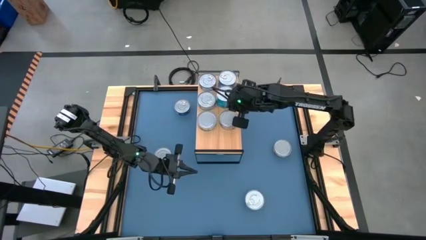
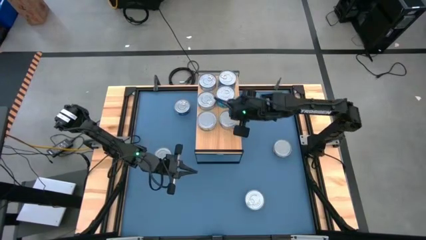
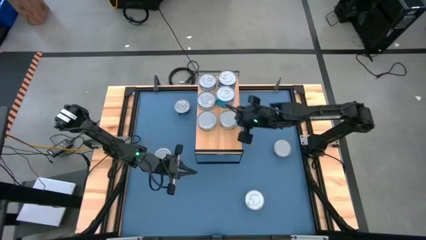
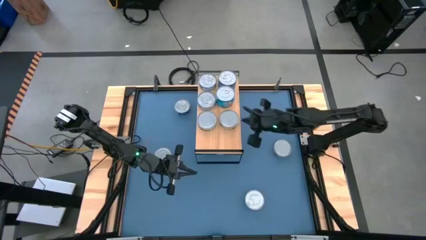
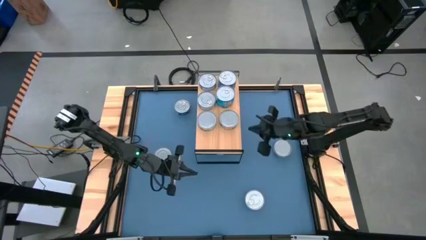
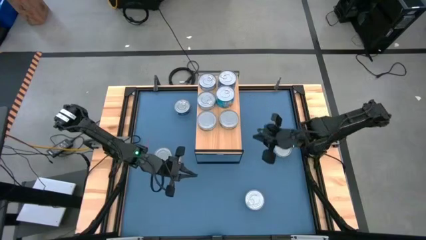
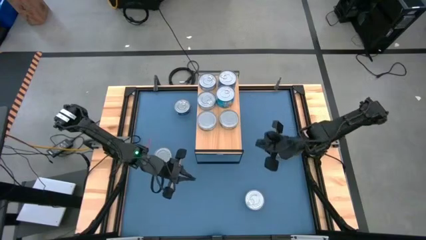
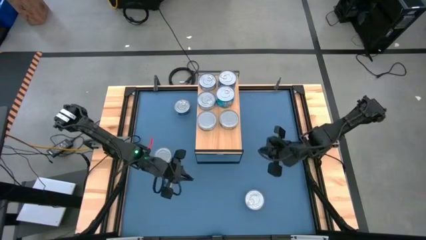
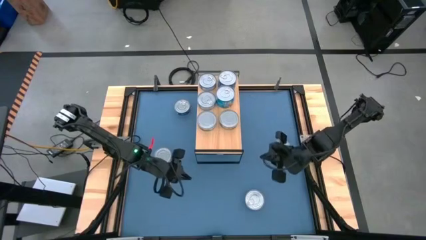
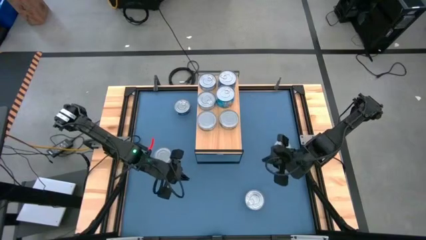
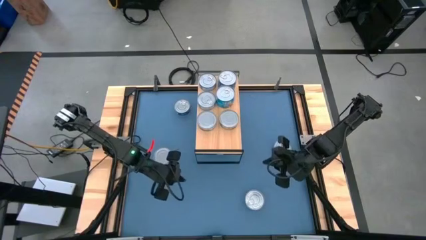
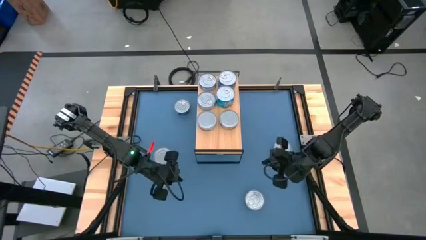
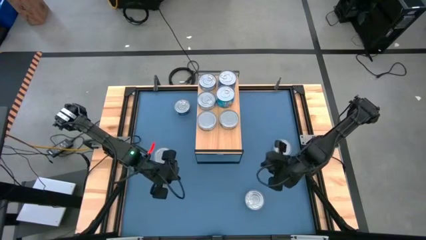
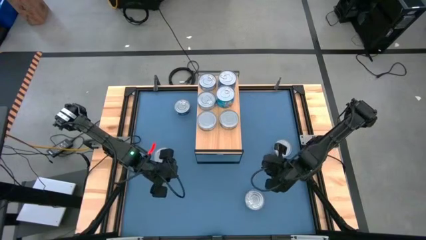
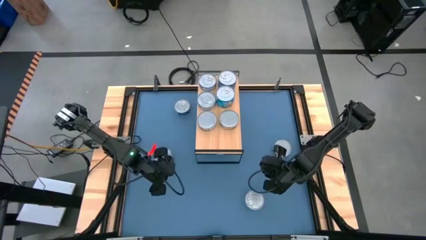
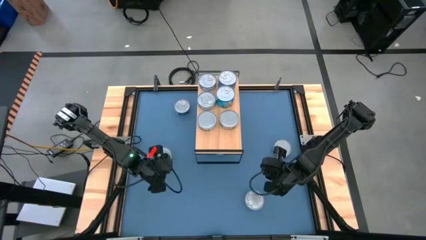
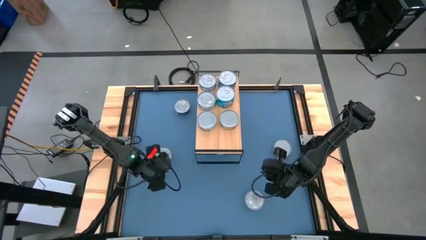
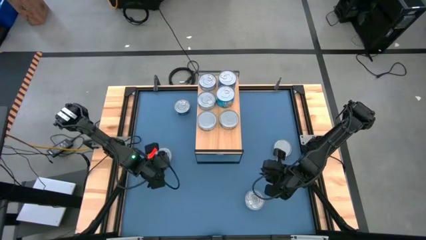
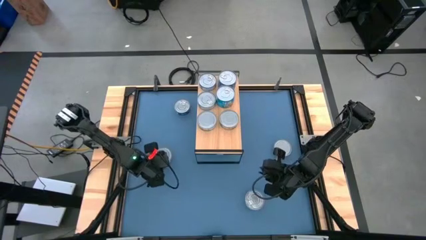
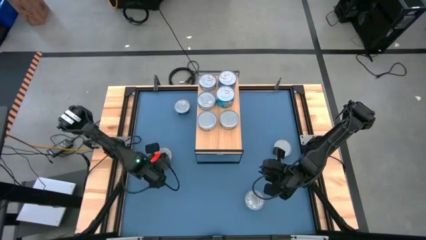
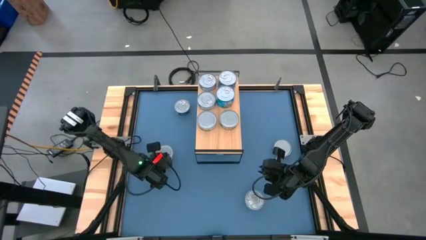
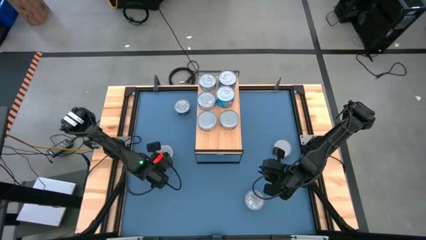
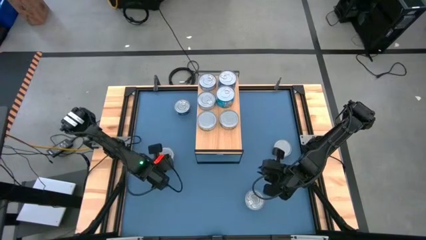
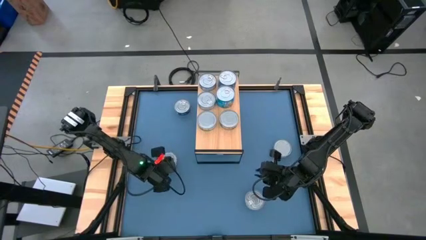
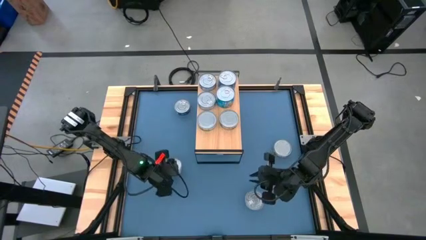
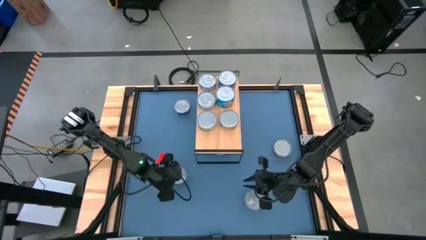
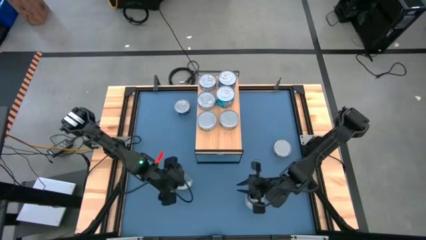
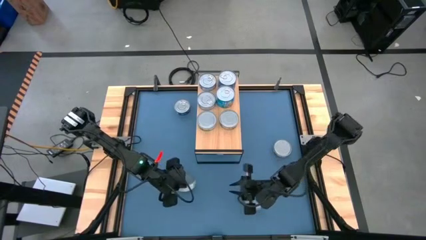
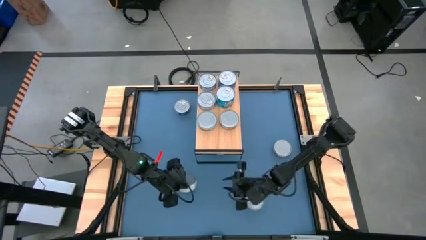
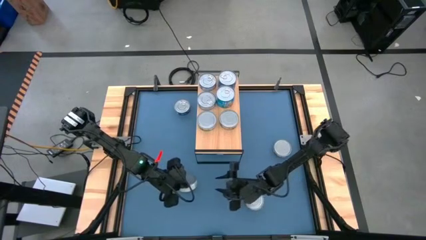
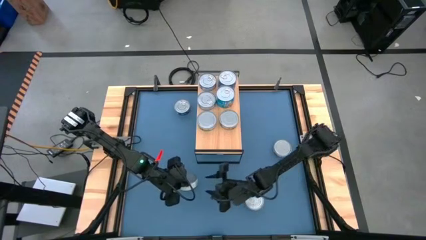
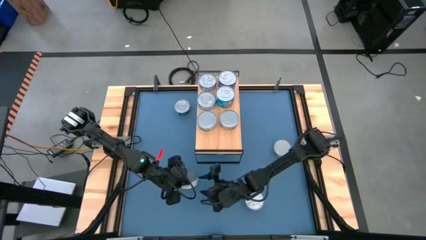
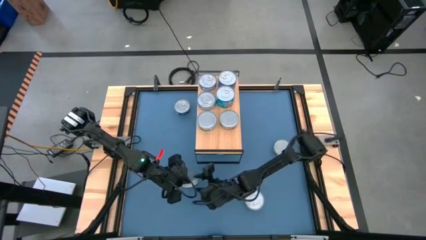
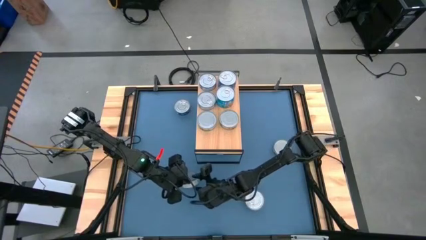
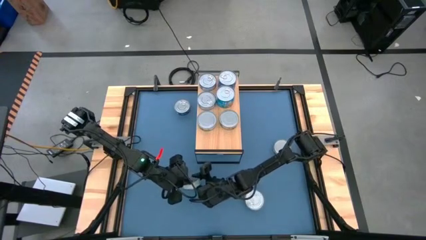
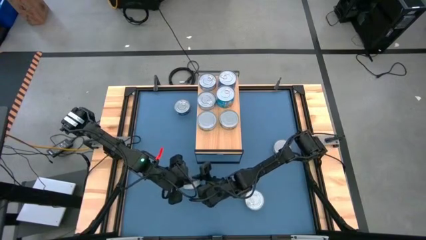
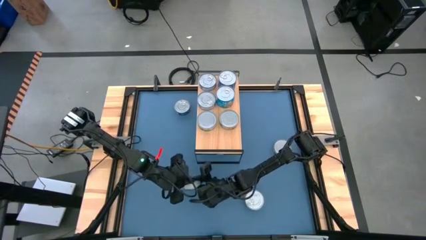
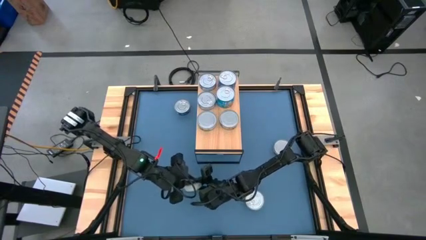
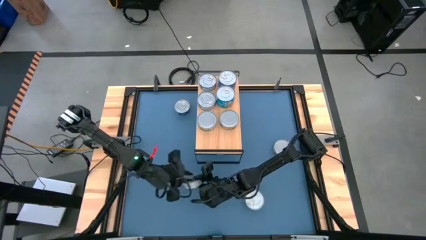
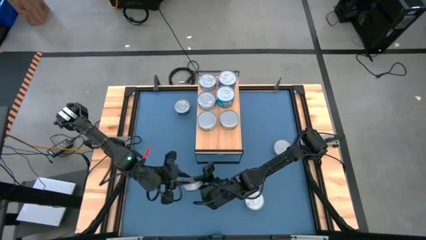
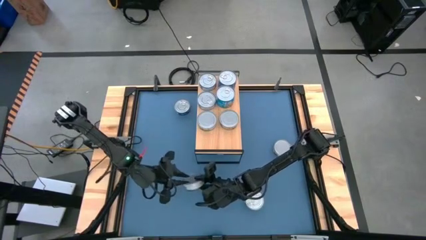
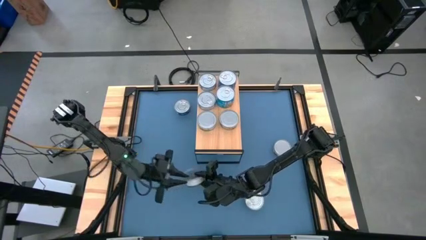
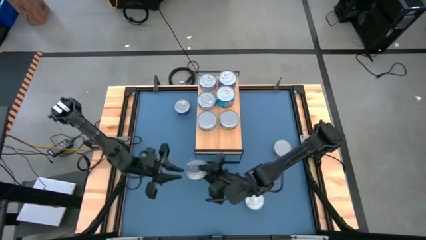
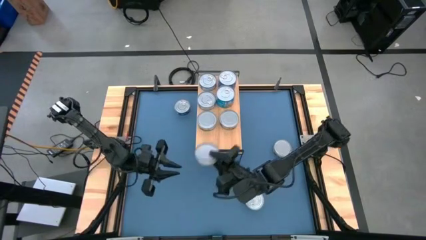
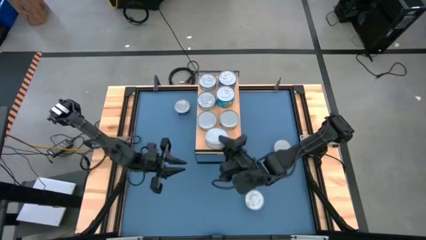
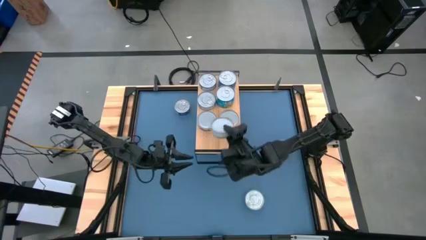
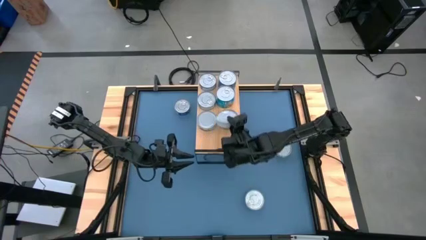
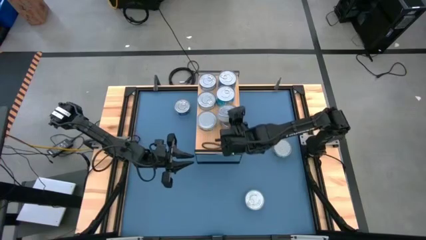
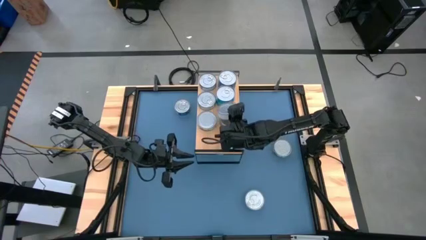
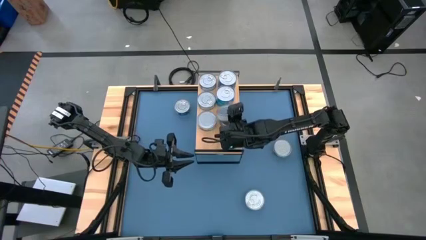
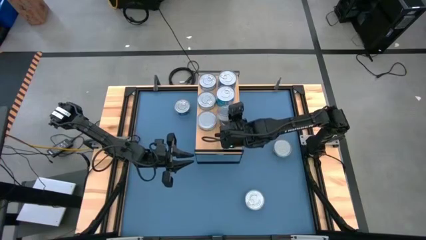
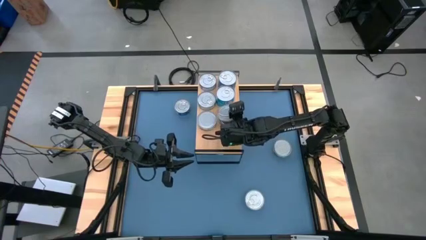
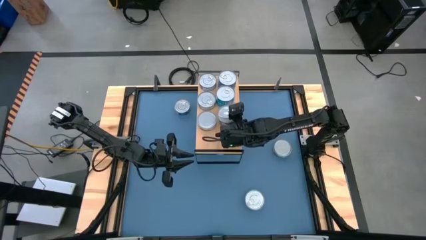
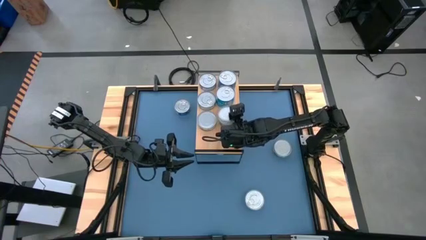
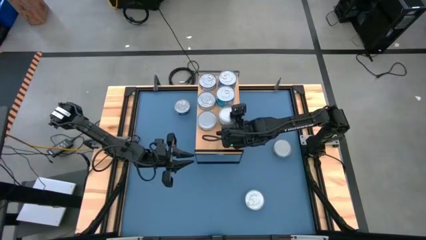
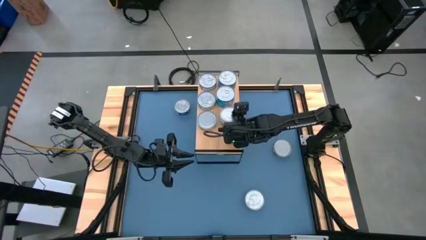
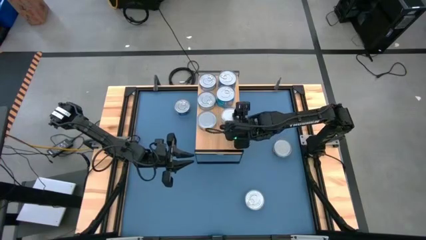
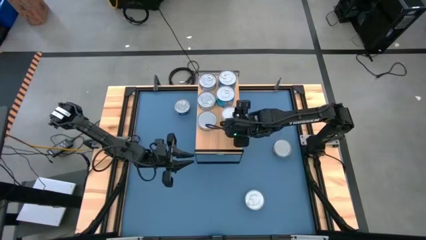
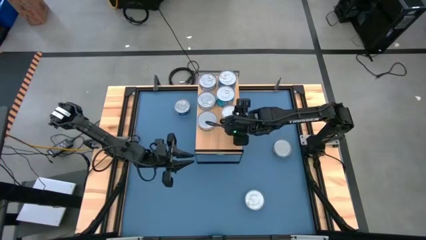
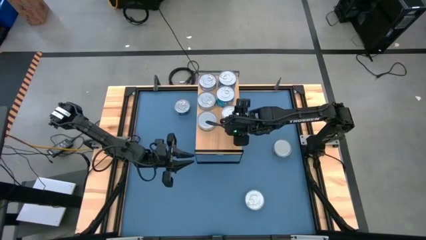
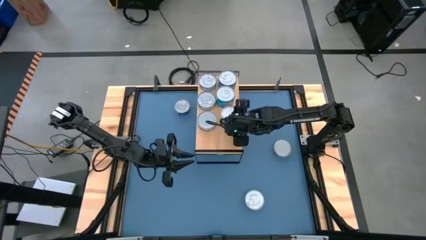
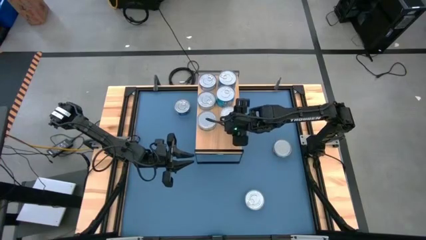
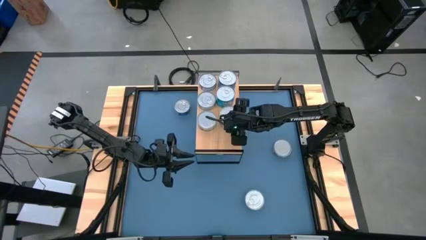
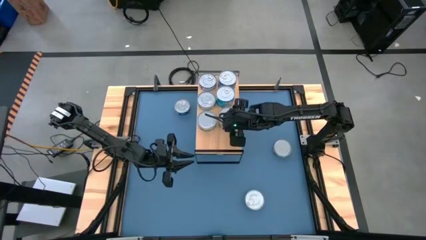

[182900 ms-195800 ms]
Task: Stack canned seafood by type on shelf
Stack the green tuna can on top of the other green tuna can on the shelf

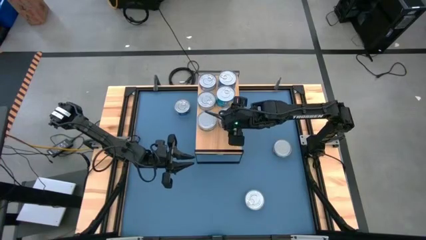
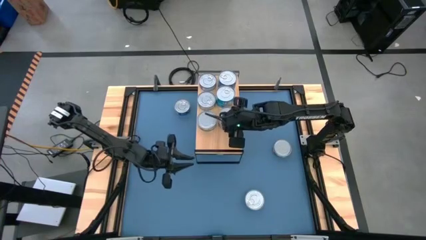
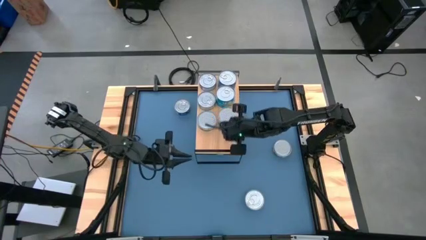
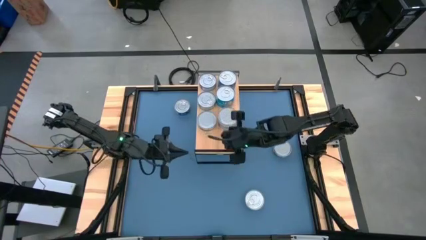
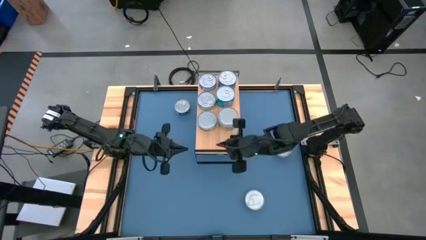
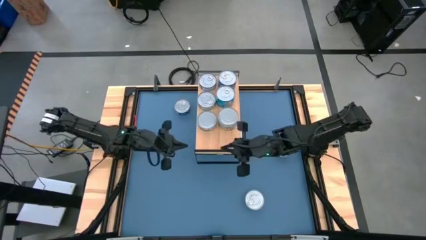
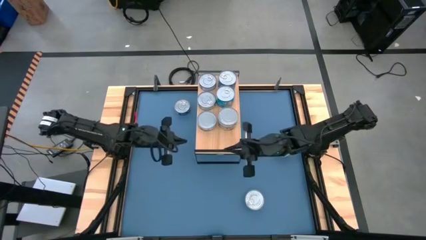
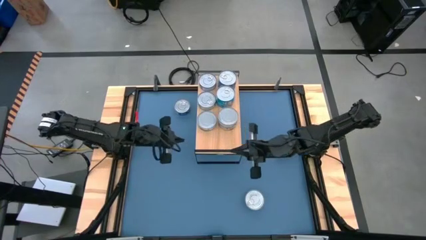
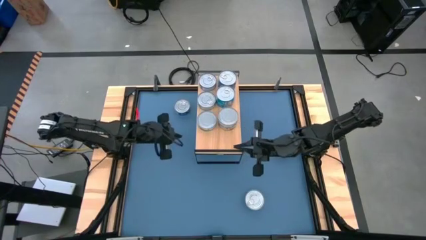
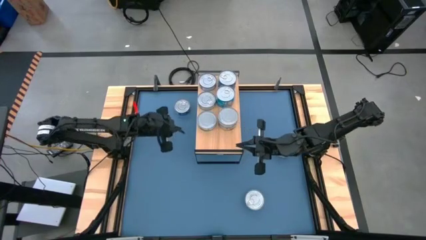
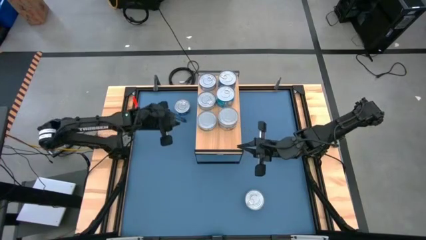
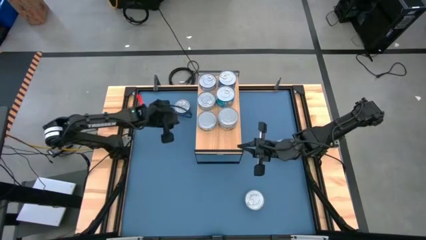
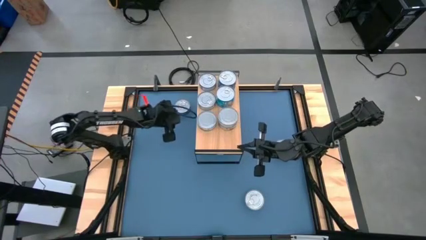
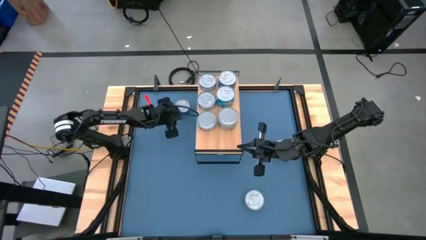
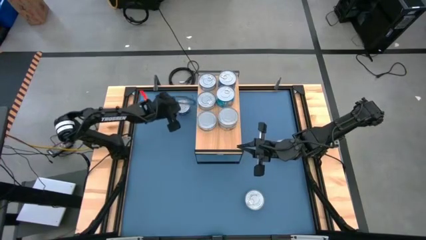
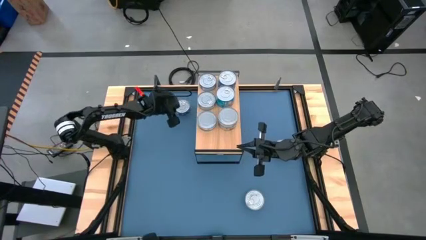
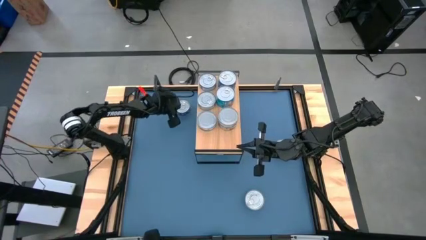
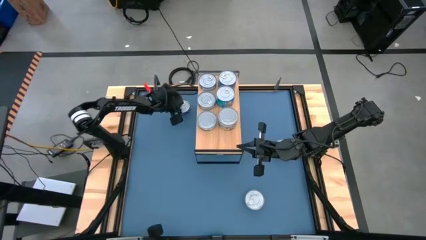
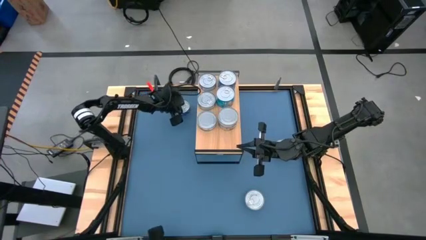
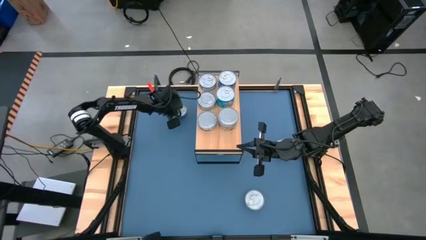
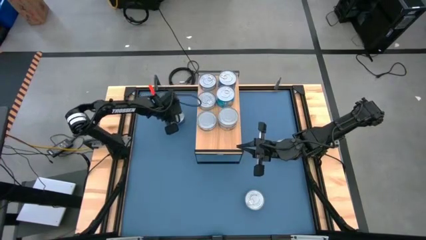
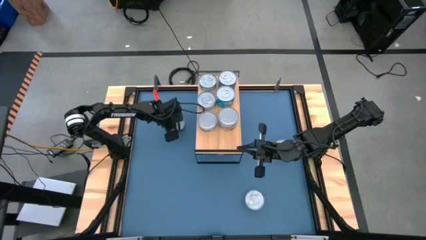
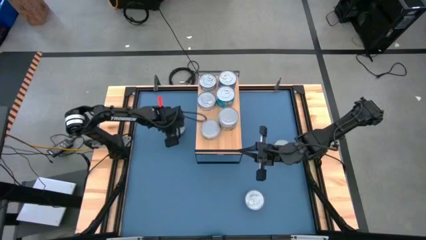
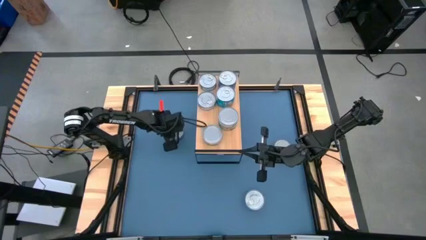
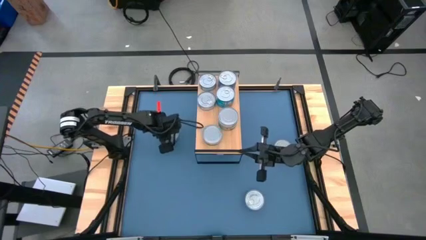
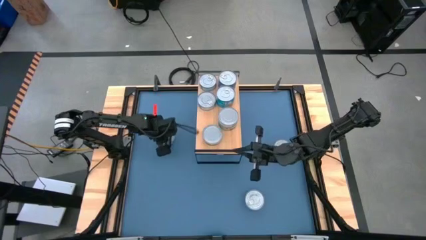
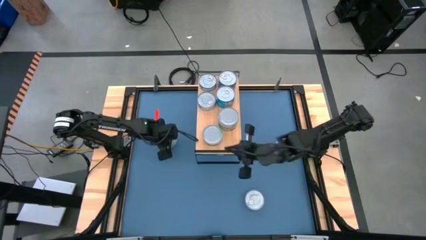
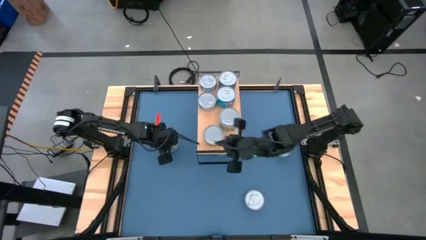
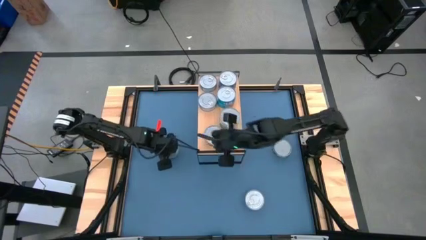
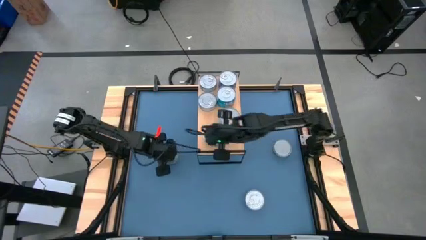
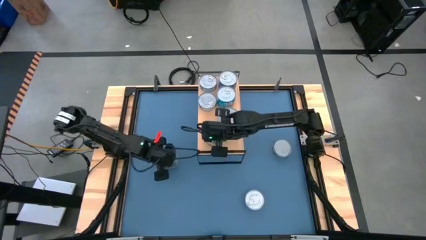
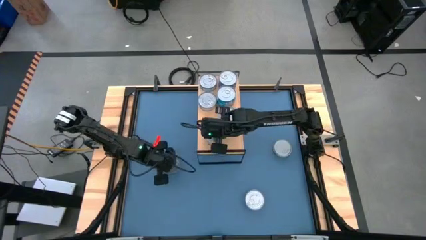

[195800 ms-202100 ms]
Move the blue tuna can to the middle left of the table
